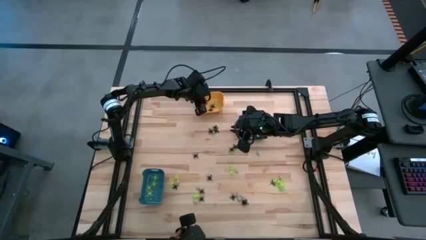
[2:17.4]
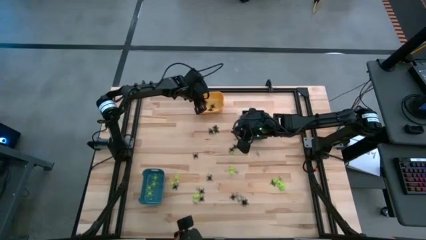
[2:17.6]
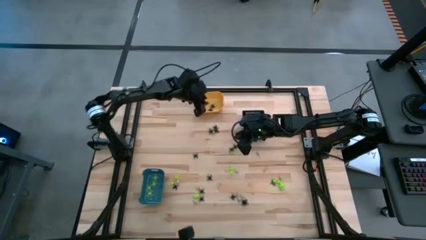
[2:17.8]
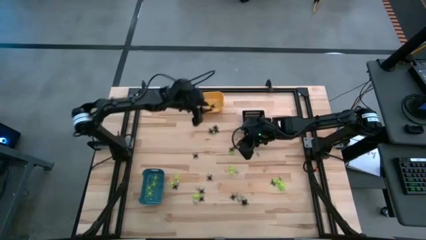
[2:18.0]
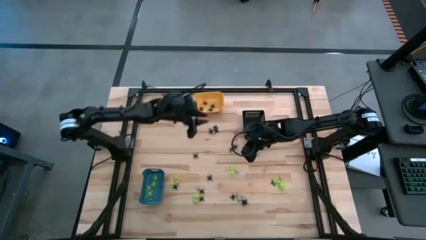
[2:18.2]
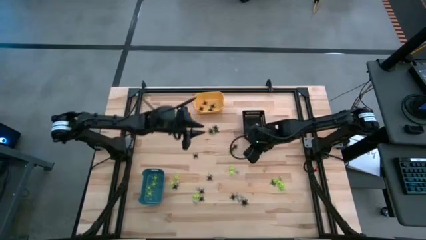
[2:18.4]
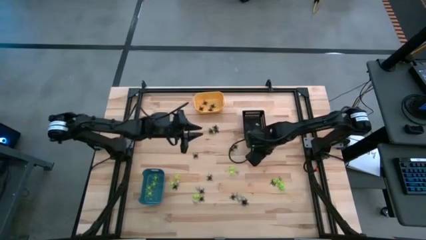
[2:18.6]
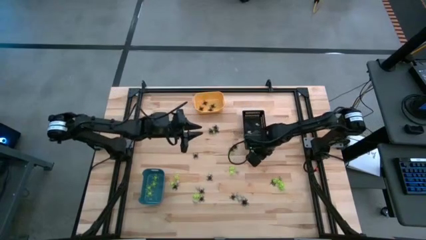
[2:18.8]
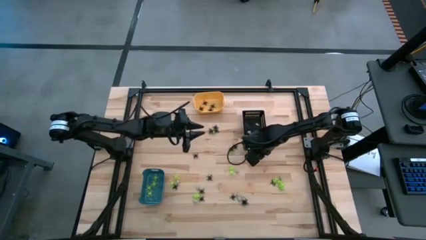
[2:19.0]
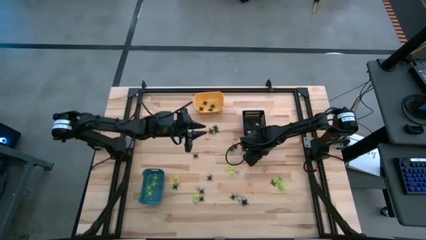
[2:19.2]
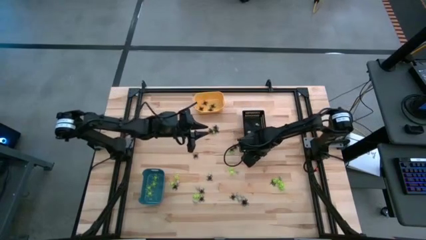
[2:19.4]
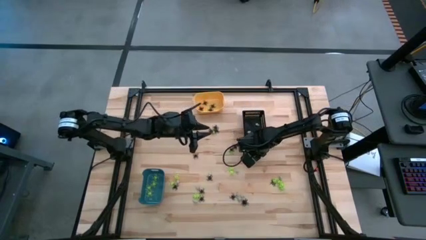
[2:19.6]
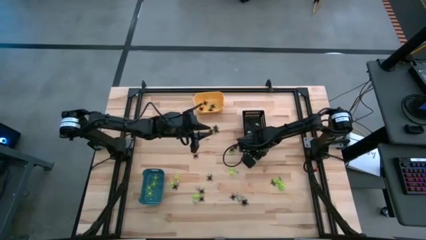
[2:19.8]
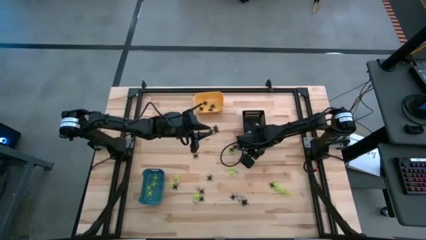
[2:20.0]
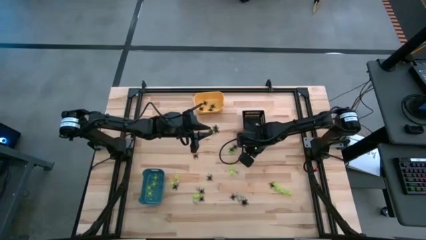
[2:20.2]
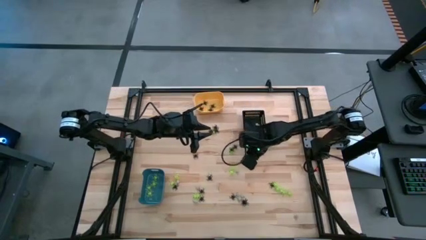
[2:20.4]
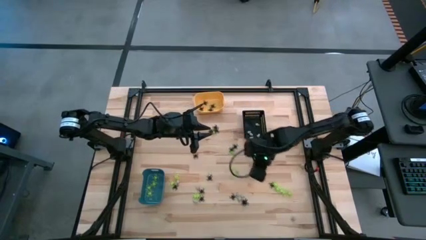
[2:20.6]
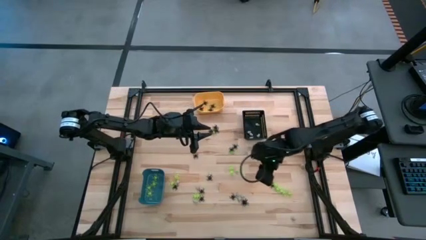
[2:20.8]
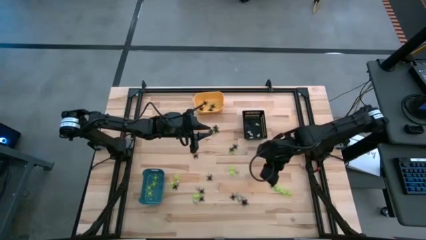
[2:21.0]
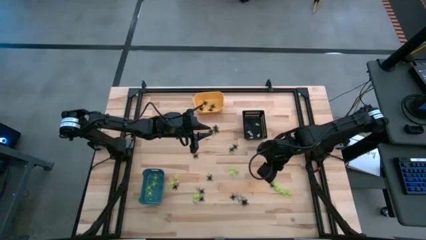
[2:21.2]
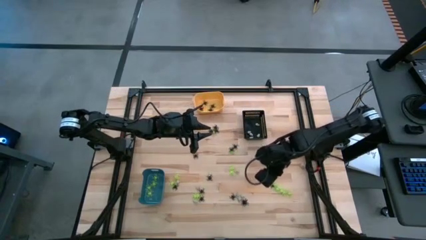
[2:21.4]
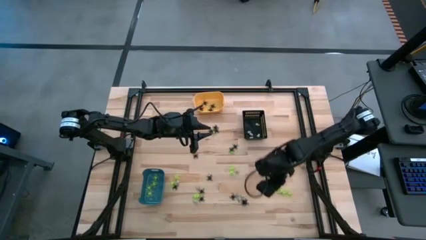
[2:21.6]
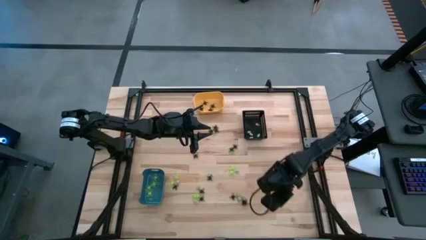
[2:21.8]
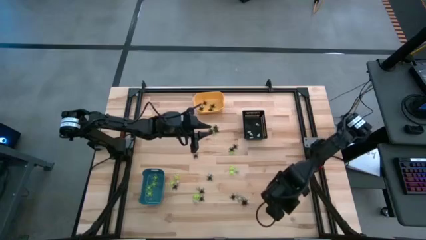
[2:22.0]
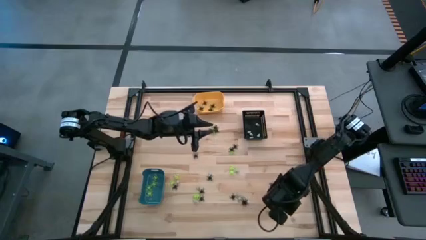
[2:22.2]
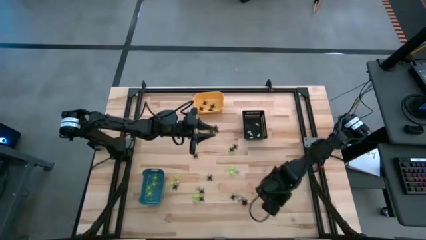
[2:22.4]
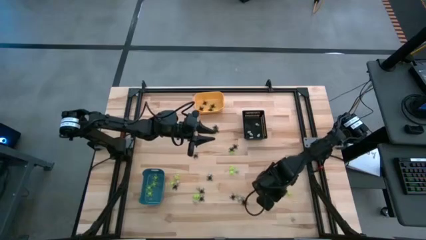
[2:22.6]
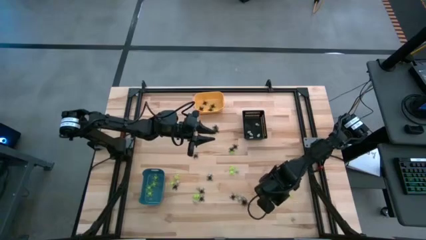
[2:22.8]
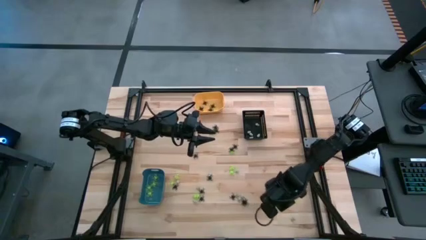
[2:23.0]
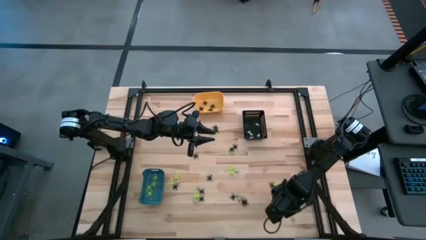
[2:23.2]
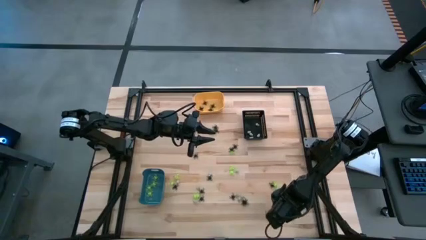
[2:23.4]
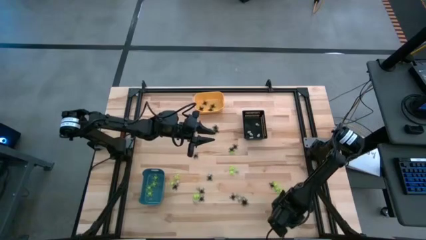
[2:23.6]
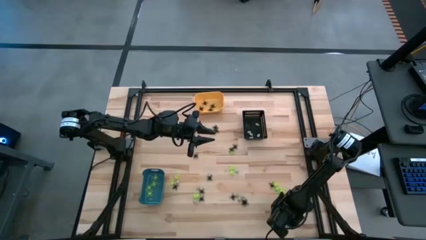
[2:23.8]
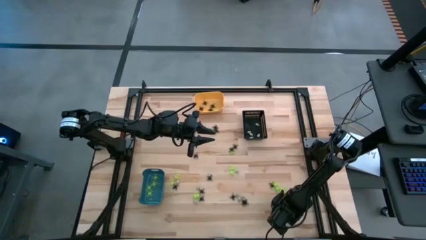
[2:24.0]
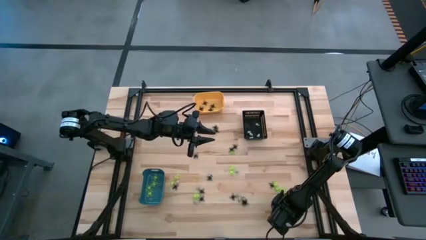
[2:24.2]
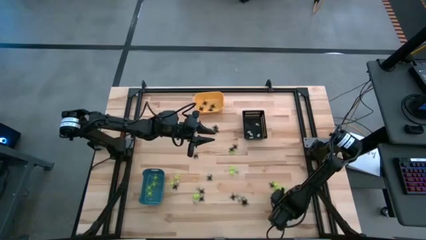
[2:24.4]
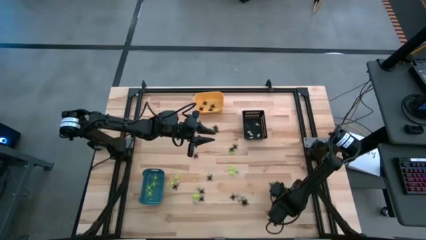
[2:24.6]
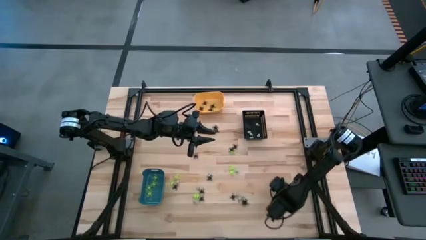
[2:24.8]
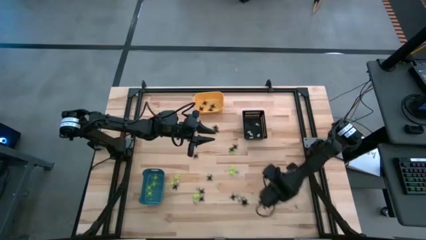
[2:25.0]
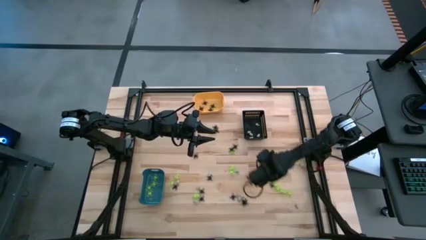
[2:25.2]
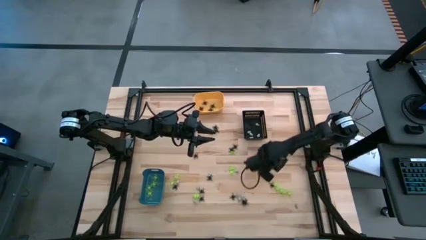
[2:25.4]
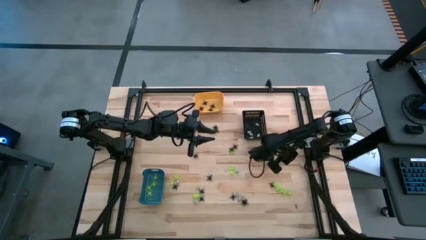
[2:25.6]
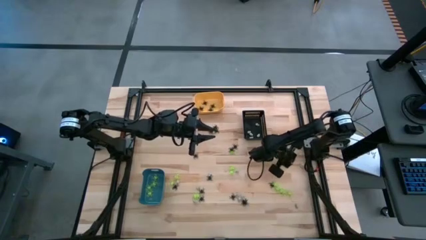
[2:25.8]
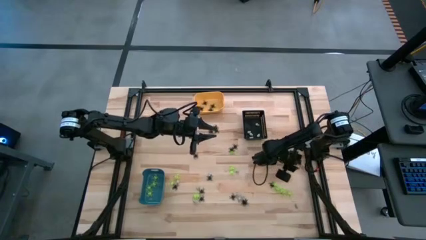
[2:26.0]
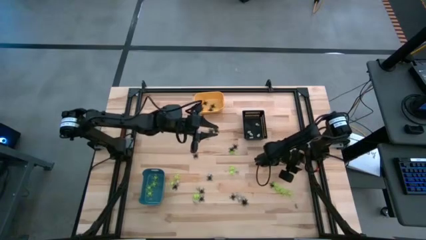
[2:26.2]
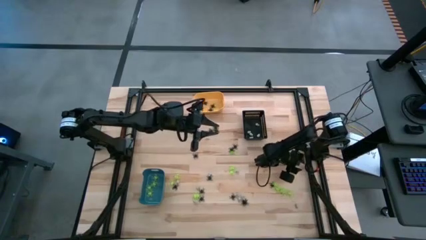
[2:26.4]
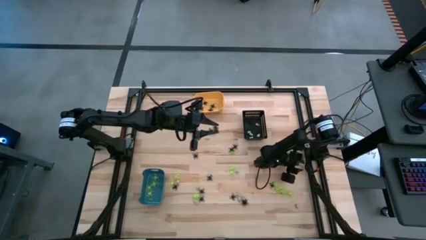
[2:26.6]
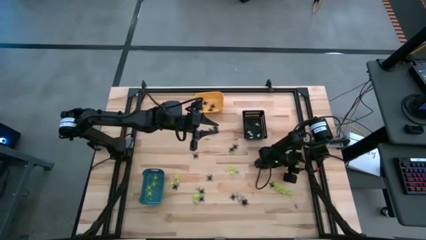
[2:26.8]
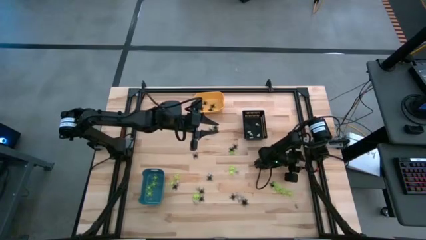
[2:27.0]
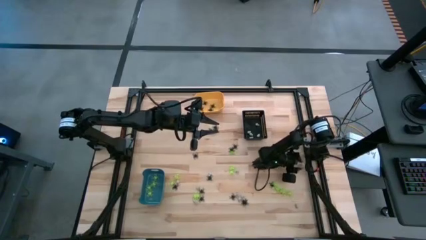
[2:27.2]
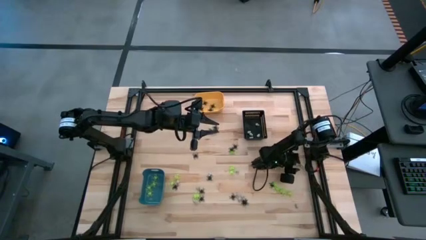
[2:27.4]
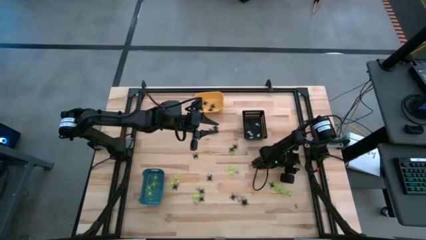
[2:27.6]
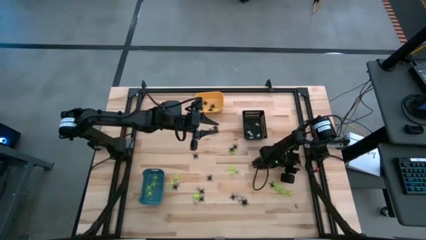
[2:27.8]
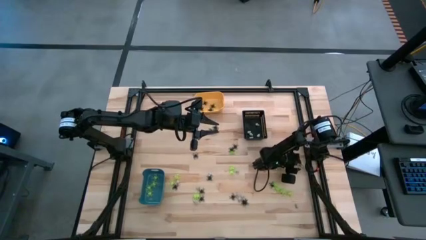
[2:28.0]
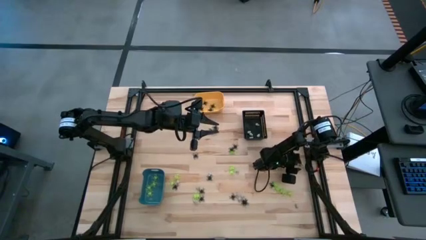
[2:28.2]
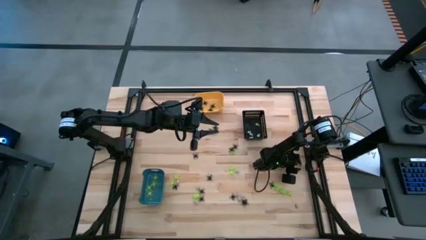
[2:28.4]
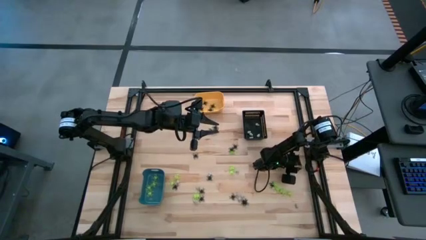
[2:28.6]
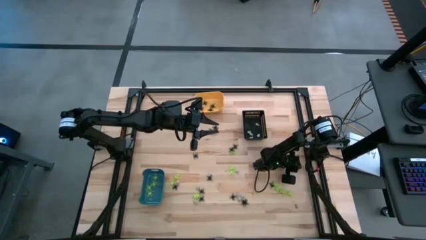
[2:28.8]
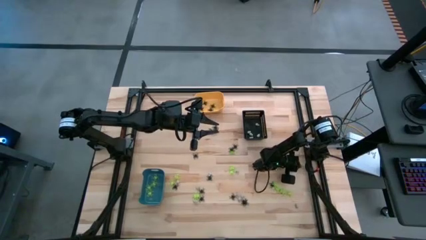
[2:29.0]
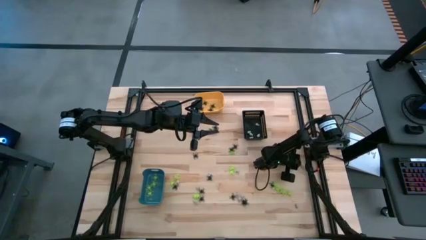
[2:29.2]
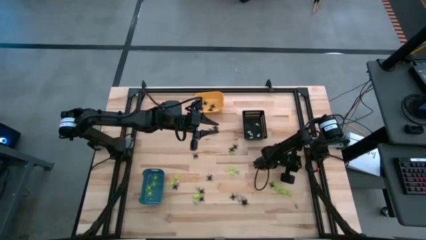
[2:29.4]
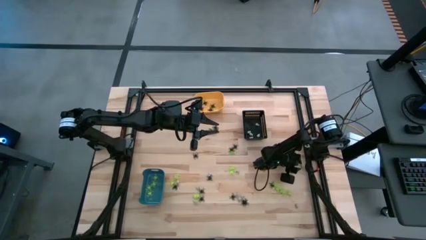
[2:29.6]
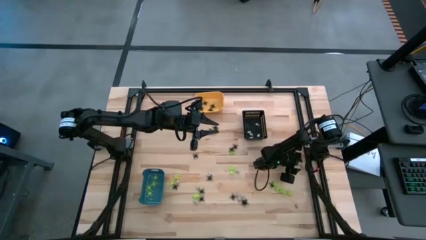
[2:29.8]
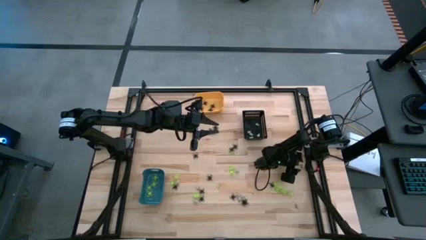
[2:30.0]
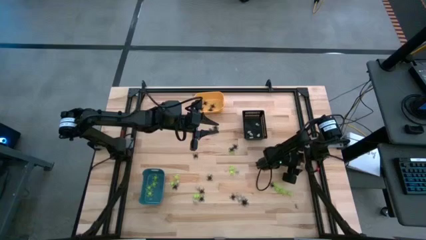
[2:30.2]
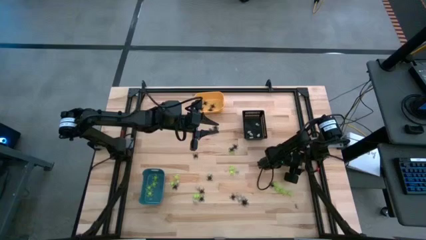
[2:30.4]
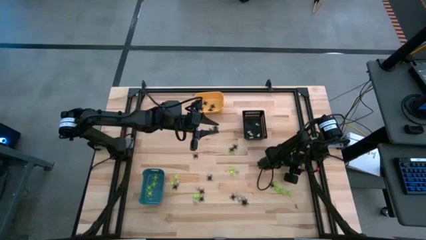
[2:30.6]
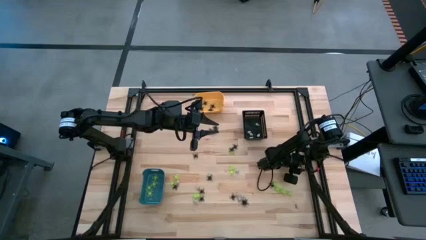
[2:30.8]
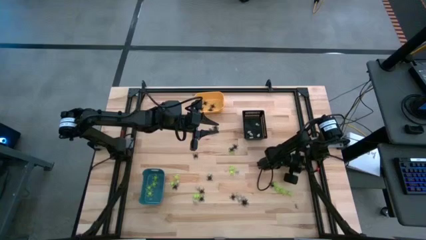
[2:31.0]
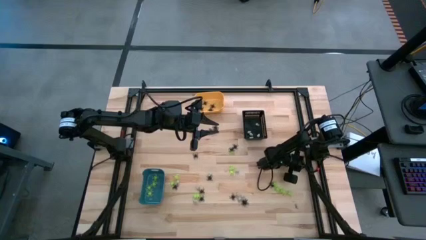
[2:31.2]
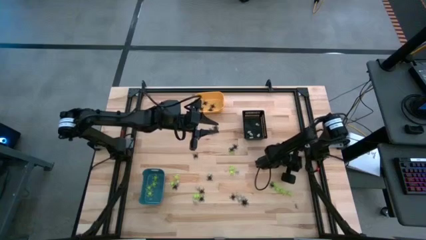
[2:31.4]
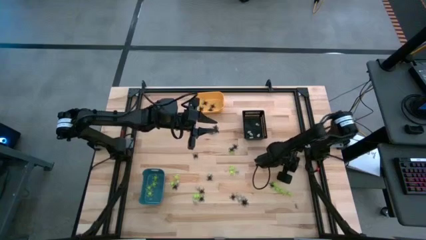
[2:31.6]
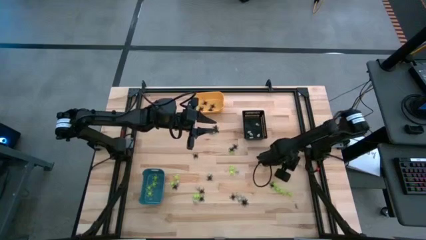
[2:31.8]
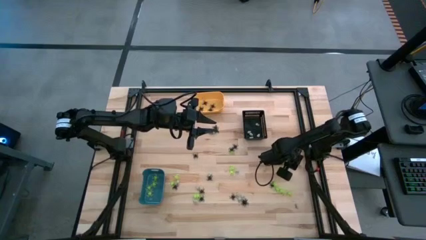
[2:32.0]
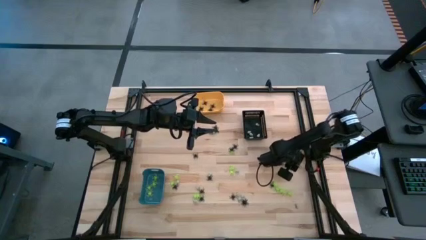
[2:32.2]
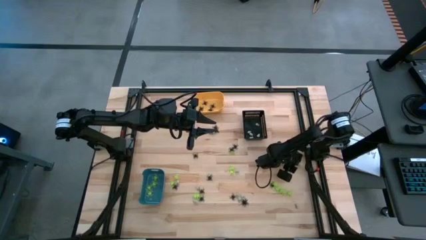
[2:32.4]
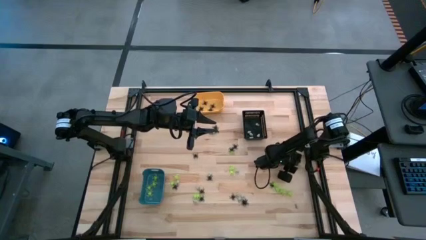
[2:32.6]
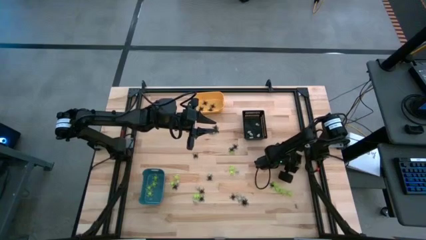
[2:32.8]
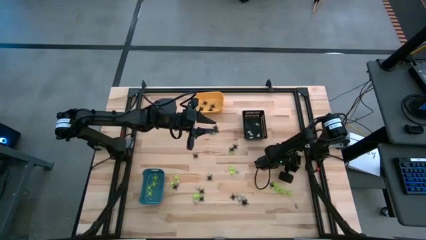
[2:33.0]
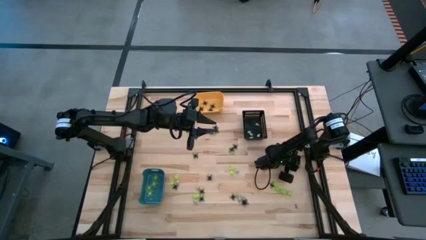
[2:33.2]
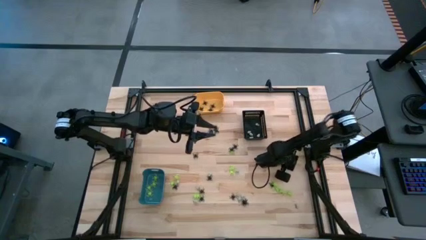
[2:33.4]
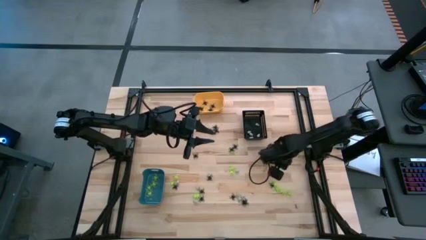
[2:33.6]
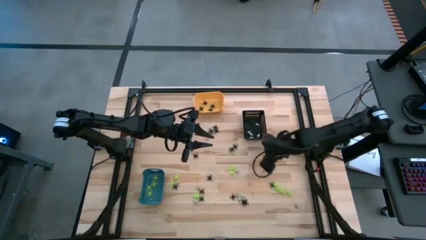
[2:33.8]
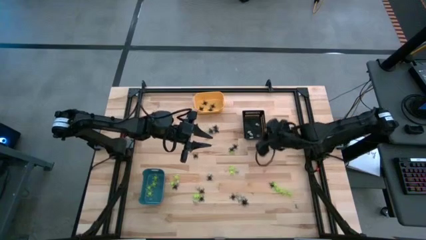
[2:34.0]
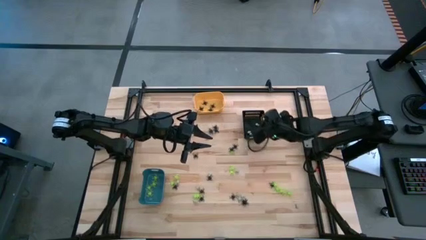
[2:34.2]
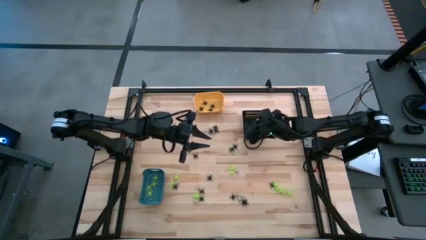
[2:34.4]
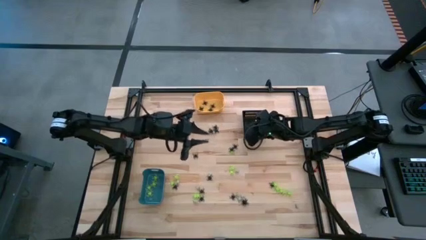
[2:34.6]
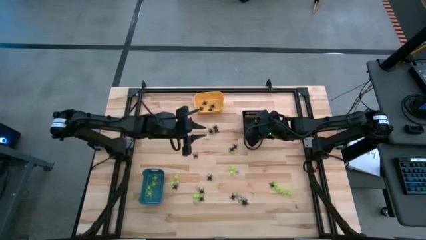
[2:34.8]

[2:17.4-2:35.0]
Task: Sort Halloween decoration
Put the white skull toy into the black bin
